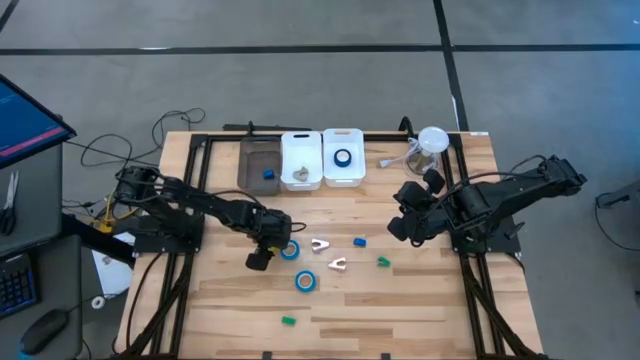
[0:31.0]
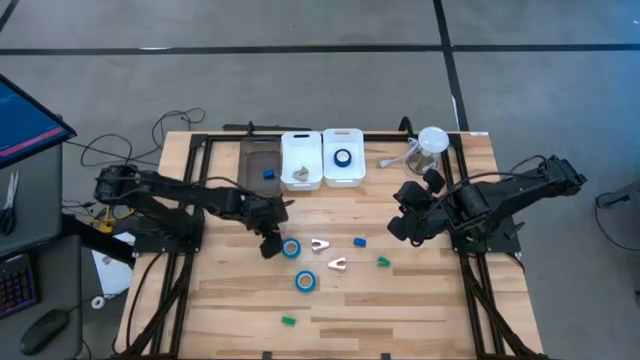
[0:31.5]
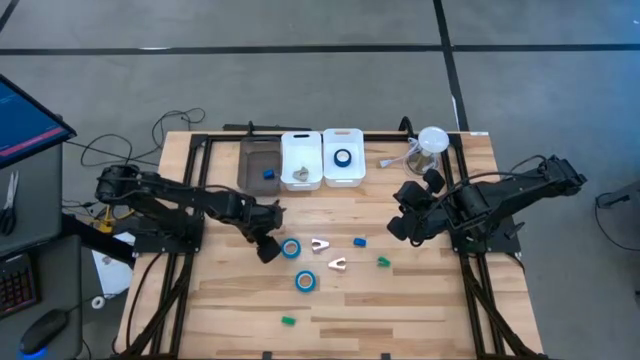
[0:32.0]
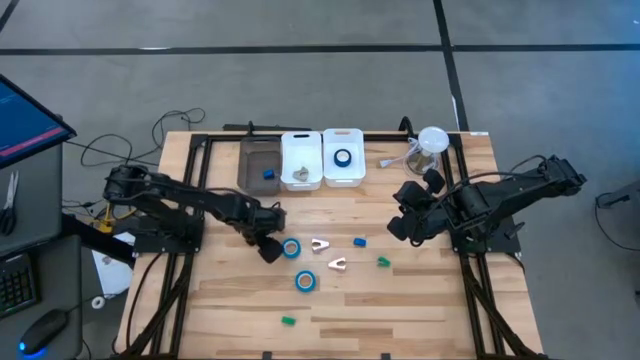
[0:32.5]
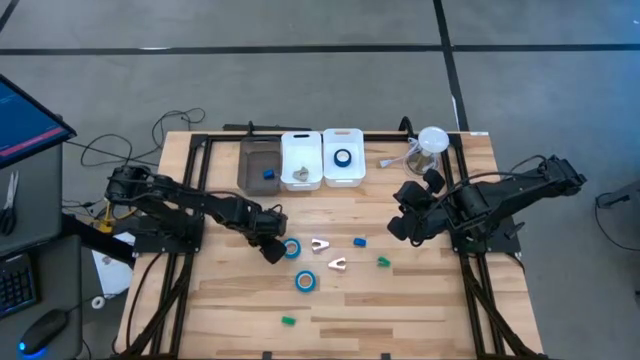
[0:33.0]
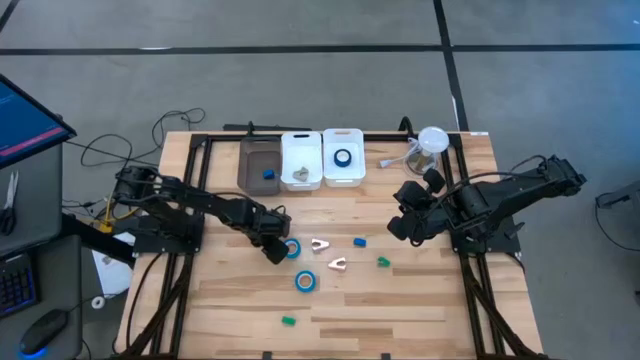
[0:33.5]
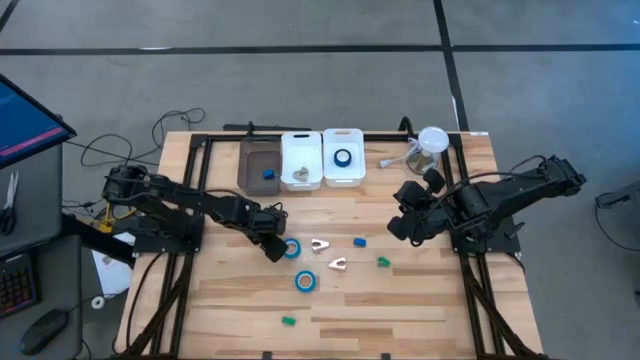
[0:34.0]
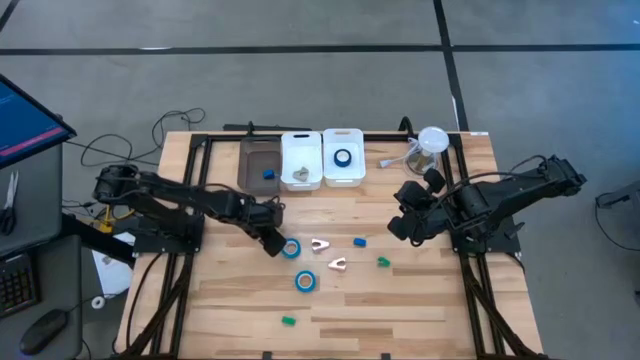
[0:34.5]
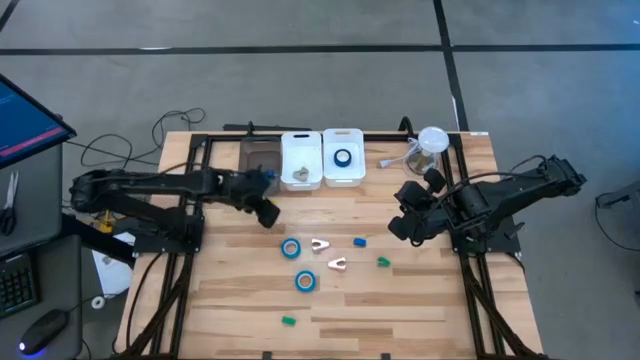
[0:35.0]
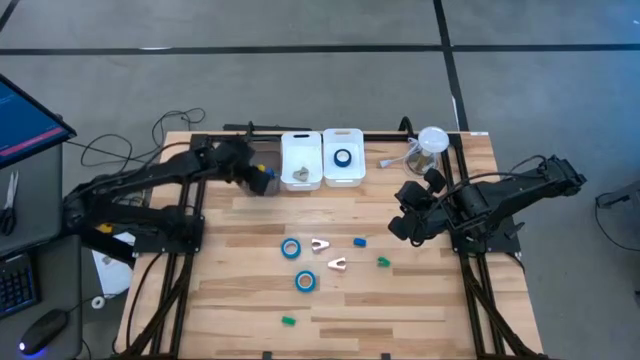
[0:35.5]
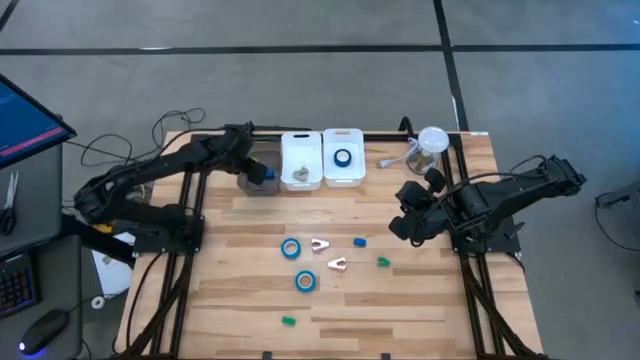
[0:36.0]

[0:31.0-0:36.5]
Task: Pick and place Stapler, Stapler remover, tape
Put the yellow stapler into the black bin

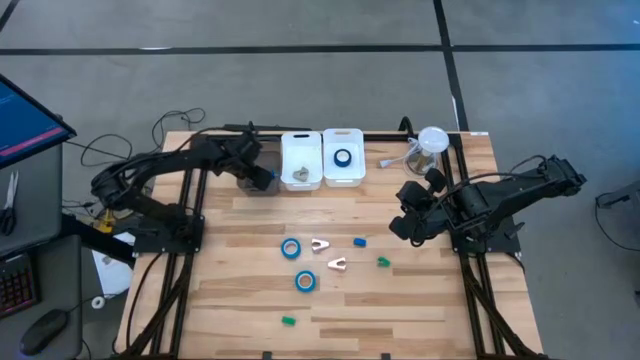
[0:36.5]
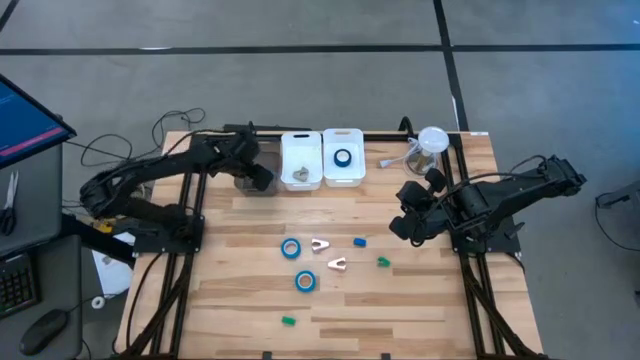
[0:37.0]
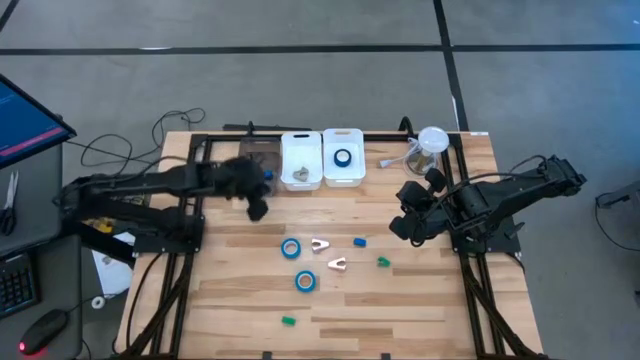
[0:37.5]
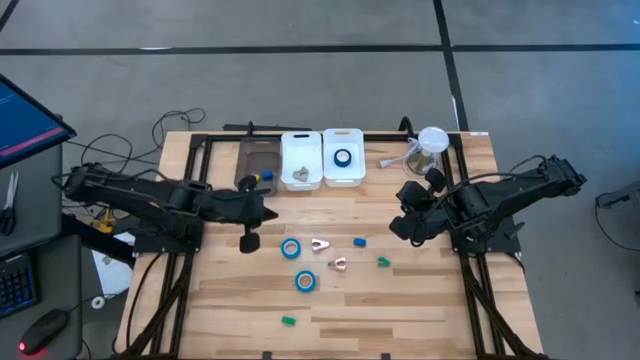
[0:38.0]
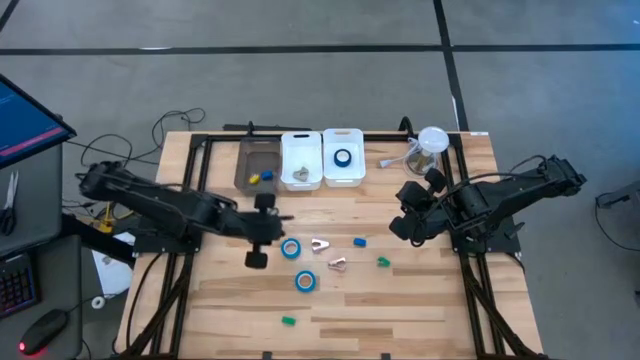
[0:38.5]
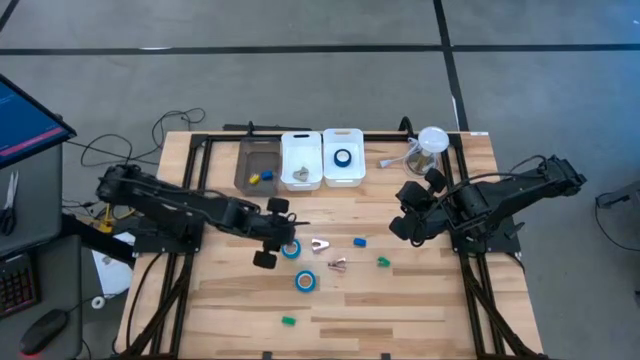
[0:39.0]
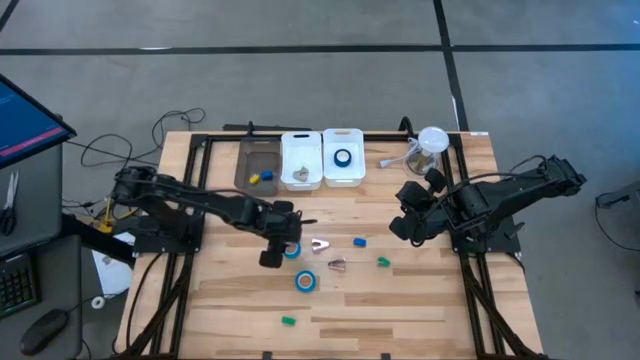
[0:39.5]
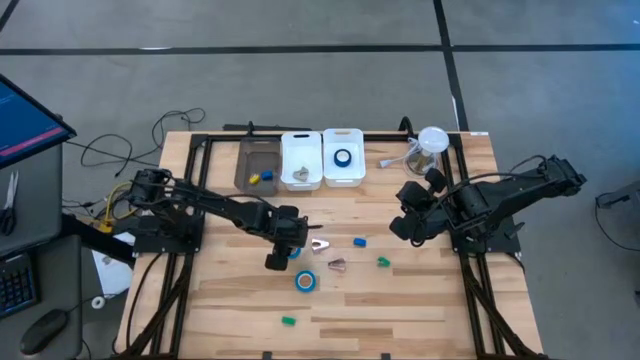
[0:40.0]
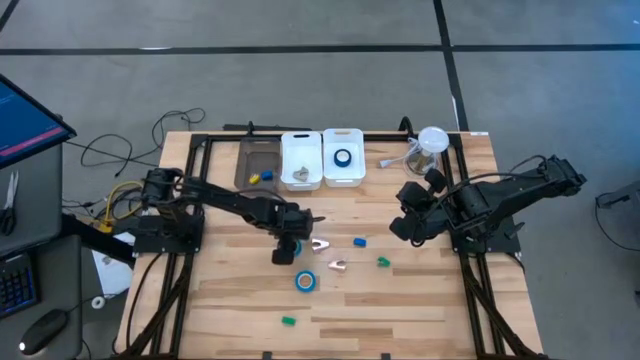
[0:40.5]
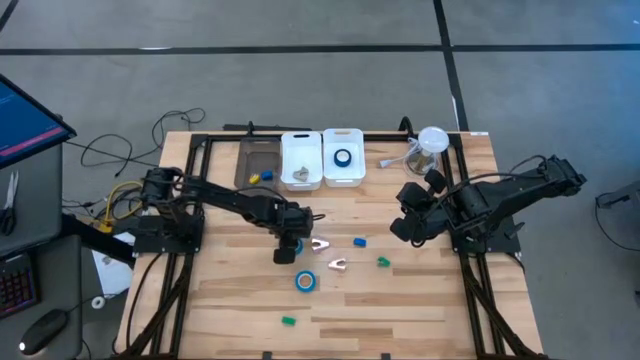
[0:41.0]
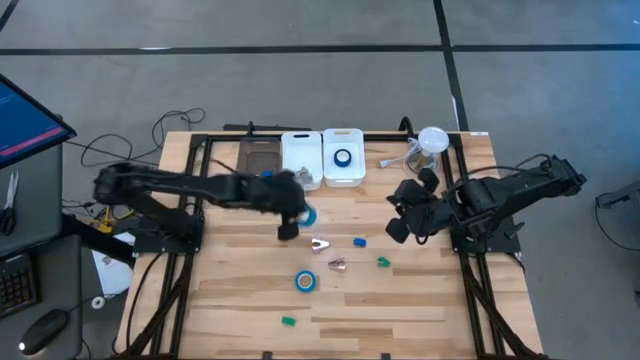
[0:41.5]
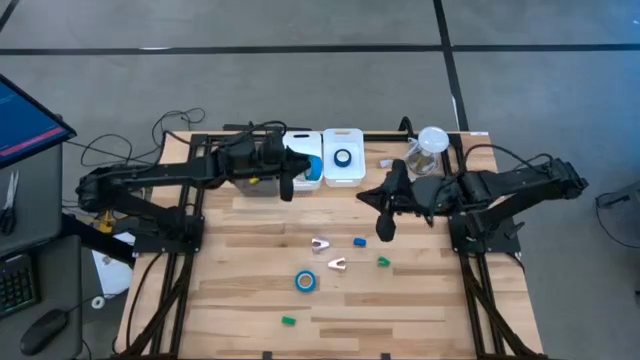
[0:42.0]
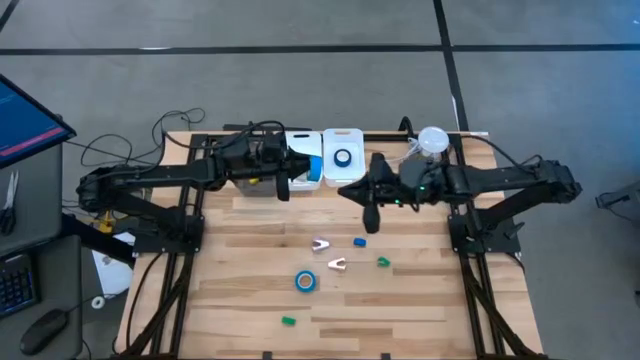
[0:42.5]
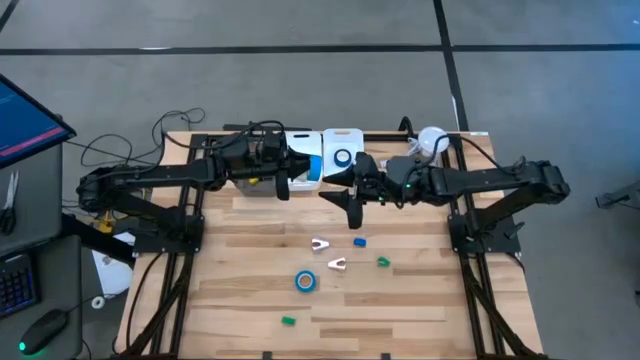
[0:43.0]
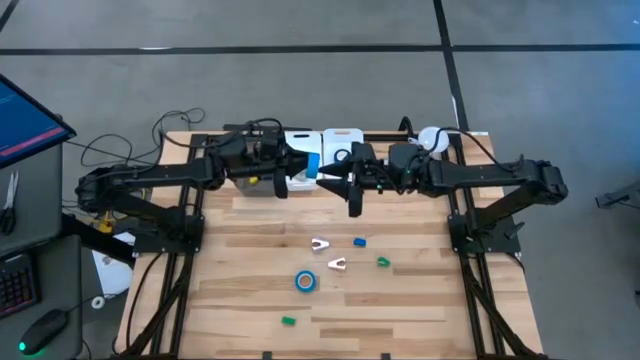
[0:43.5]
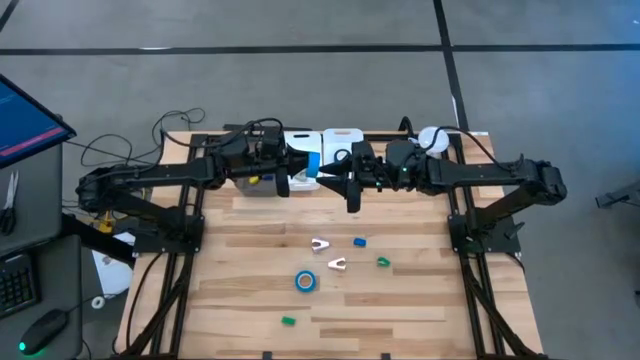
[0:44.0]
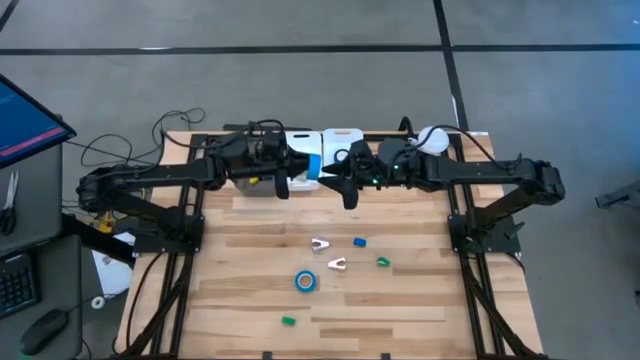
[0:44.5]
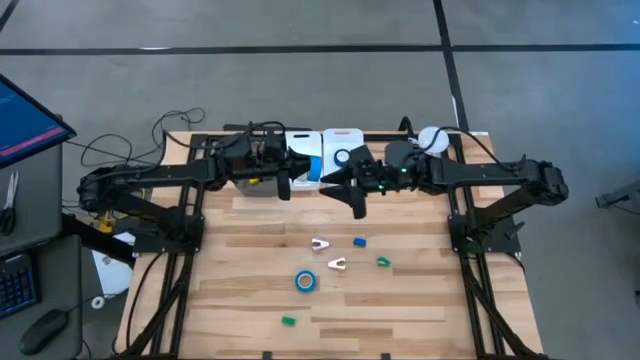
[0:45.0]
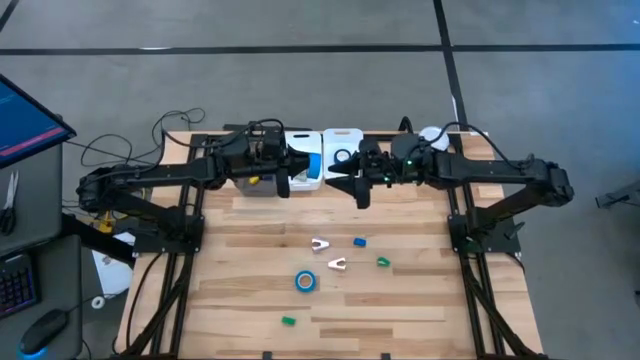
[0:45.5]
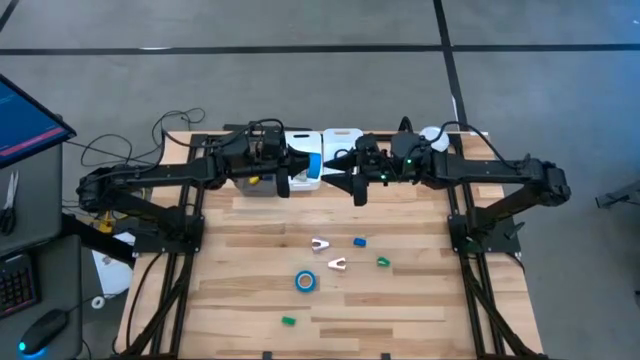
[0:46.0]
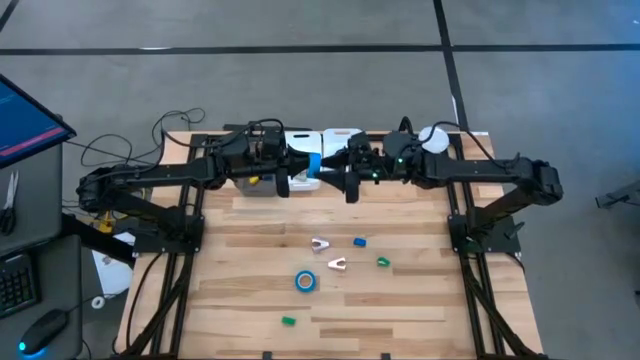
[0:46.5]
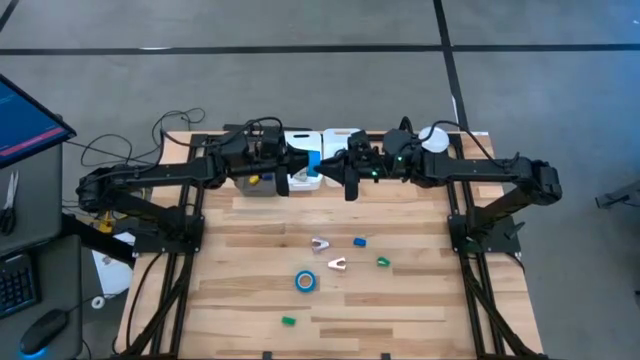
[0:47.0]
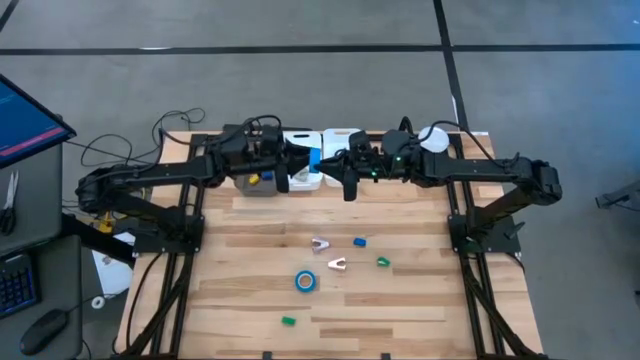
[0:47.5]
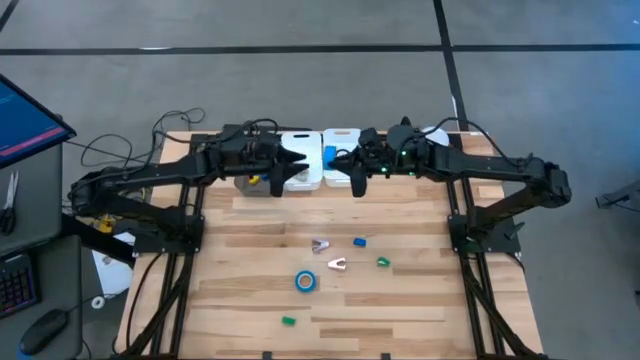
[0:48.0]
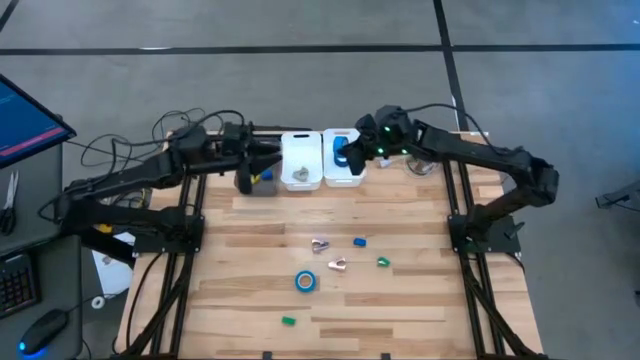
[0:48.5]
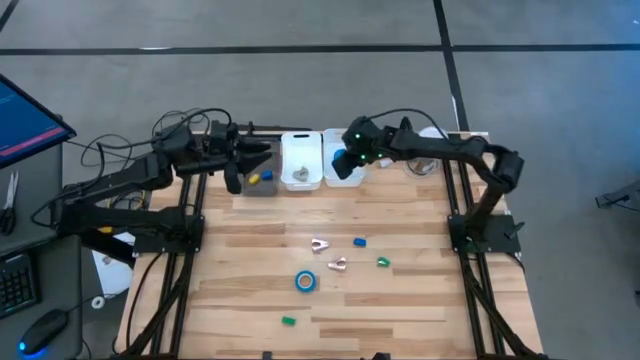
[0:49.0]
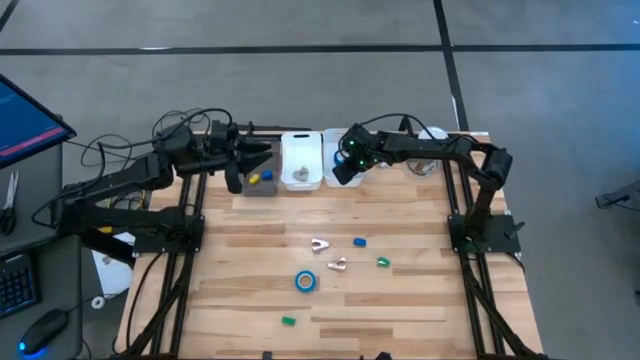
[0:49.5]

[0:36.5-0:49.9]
Put the top light blue tape into the right white bin
